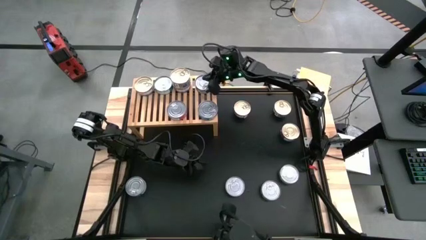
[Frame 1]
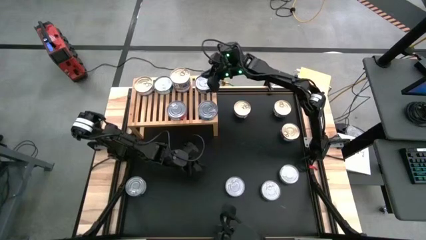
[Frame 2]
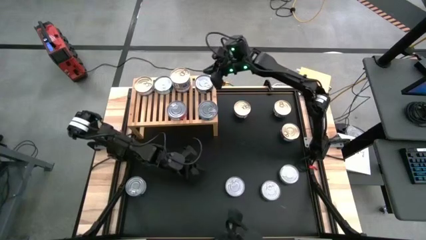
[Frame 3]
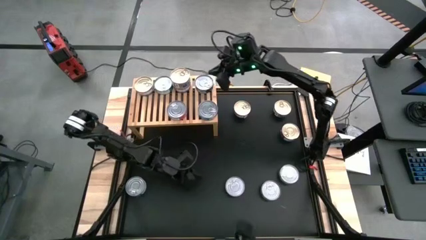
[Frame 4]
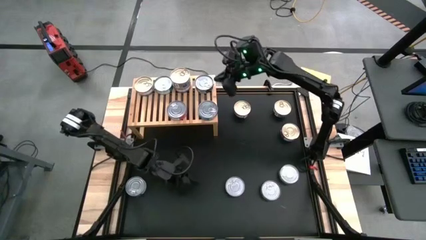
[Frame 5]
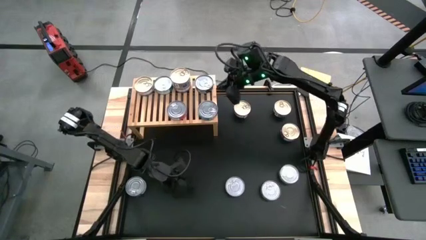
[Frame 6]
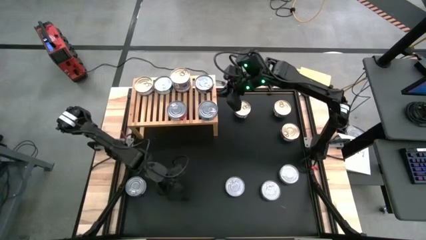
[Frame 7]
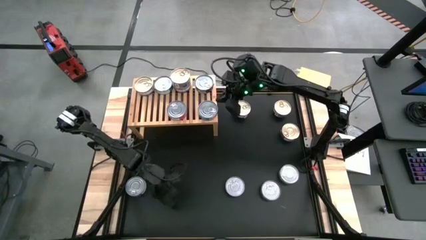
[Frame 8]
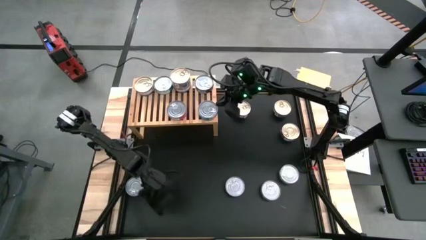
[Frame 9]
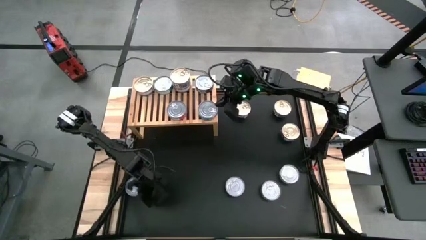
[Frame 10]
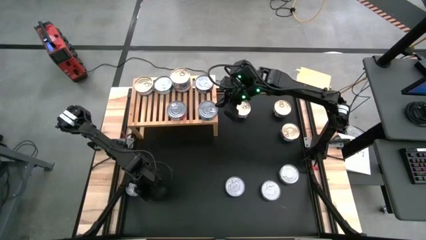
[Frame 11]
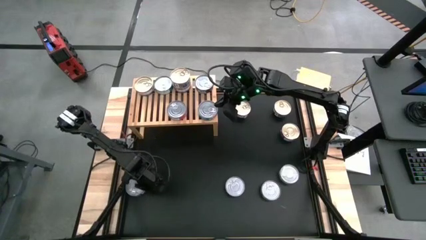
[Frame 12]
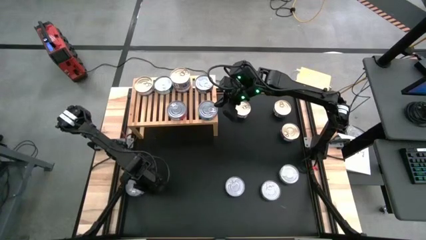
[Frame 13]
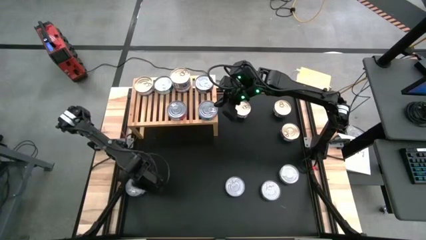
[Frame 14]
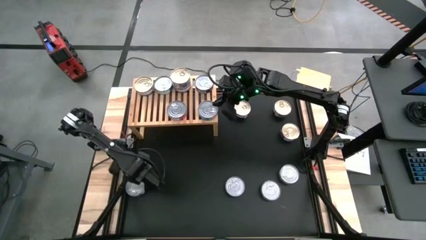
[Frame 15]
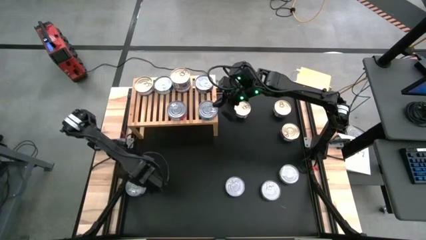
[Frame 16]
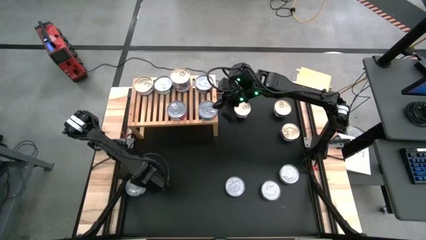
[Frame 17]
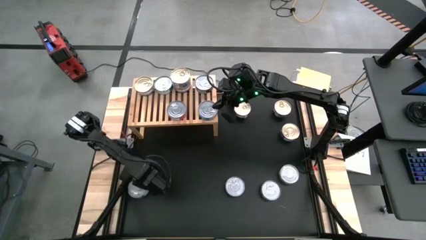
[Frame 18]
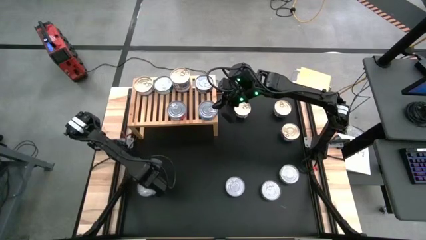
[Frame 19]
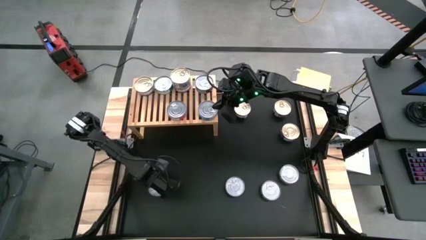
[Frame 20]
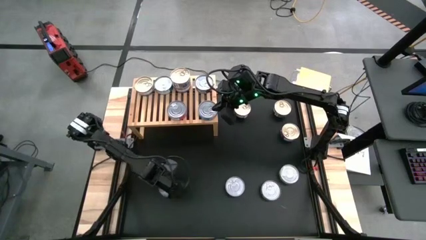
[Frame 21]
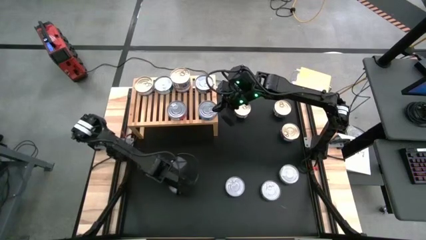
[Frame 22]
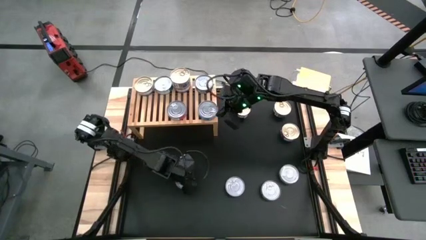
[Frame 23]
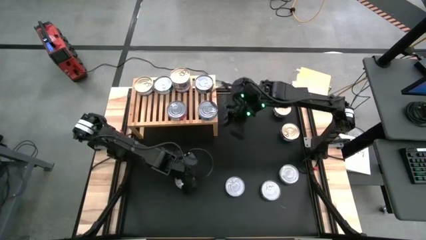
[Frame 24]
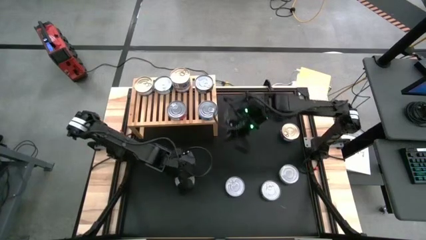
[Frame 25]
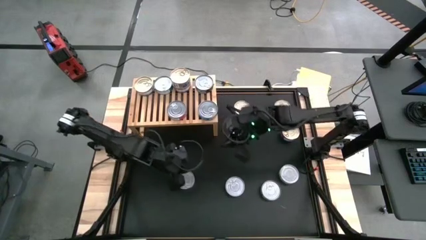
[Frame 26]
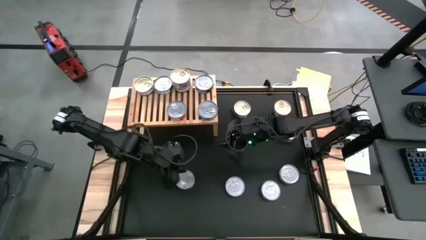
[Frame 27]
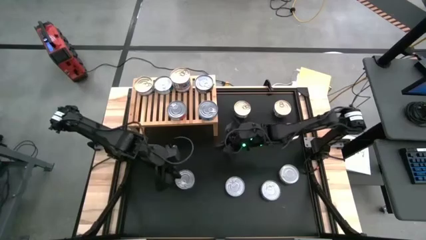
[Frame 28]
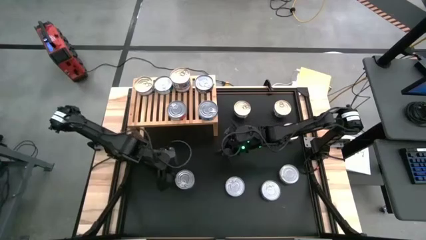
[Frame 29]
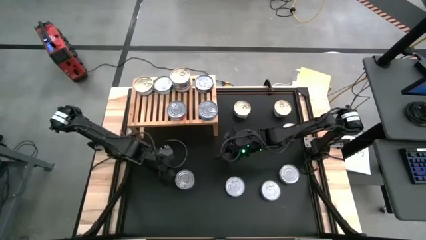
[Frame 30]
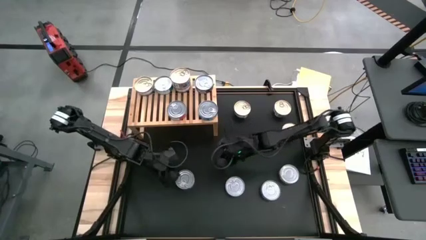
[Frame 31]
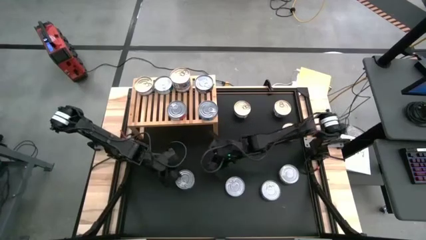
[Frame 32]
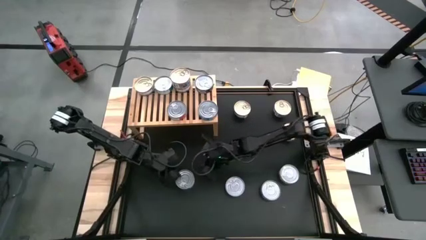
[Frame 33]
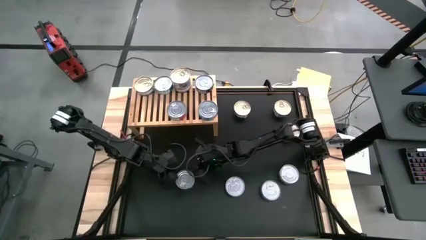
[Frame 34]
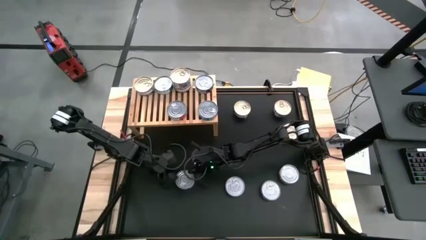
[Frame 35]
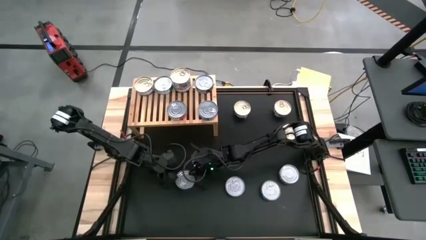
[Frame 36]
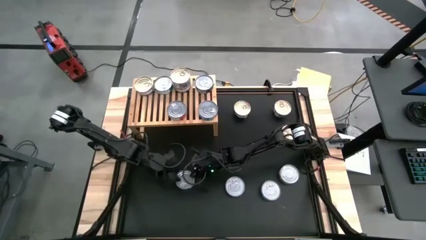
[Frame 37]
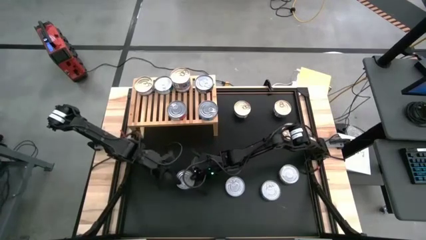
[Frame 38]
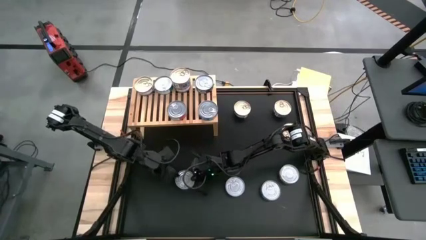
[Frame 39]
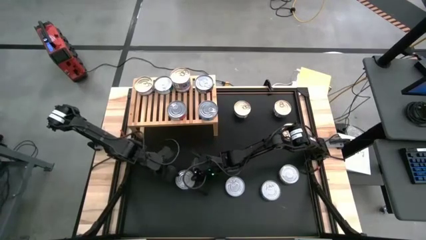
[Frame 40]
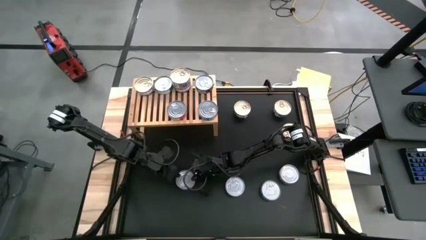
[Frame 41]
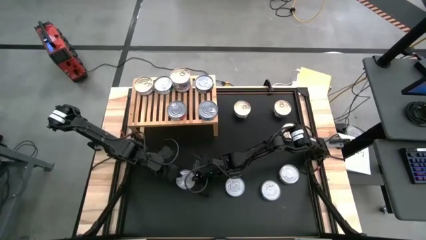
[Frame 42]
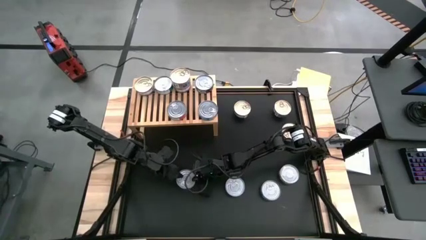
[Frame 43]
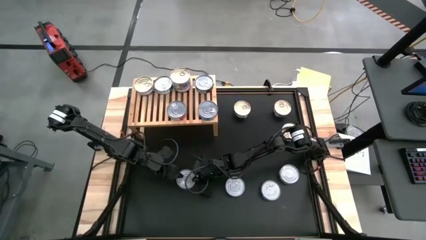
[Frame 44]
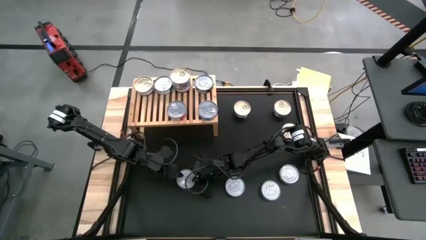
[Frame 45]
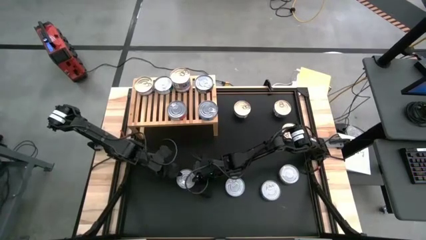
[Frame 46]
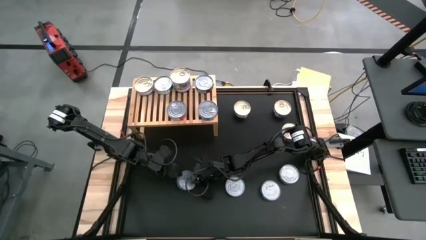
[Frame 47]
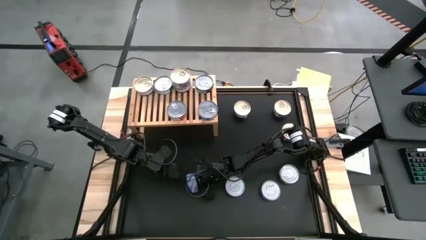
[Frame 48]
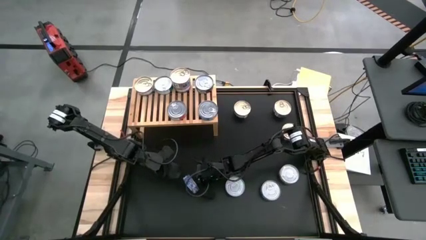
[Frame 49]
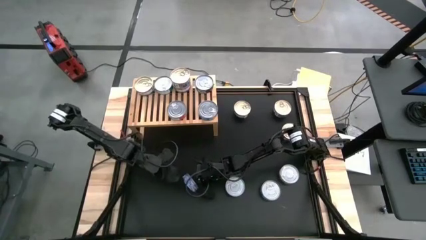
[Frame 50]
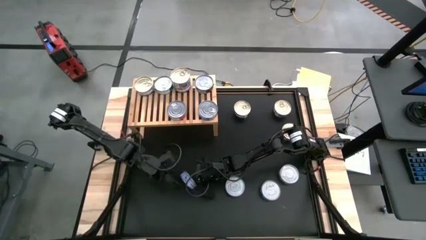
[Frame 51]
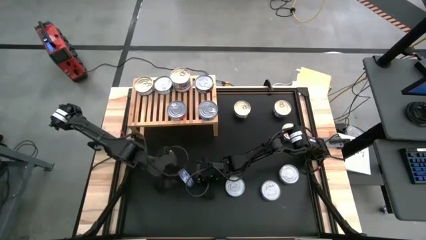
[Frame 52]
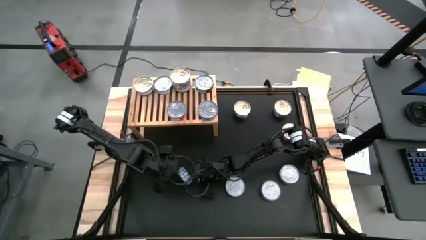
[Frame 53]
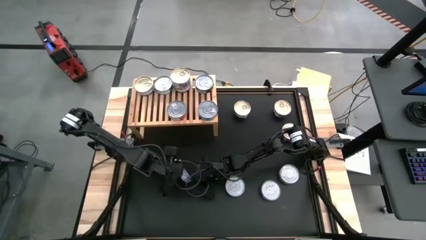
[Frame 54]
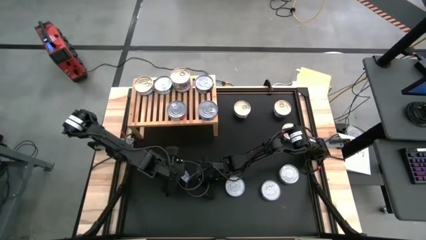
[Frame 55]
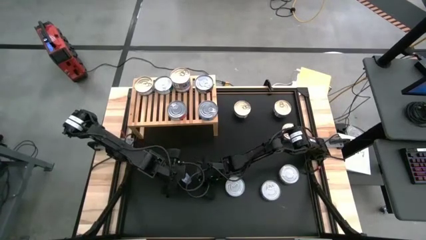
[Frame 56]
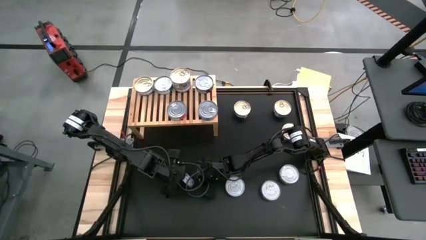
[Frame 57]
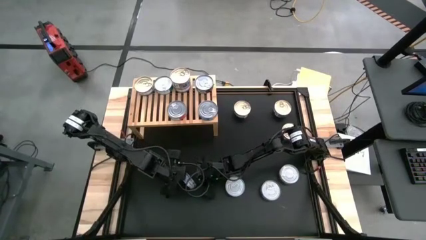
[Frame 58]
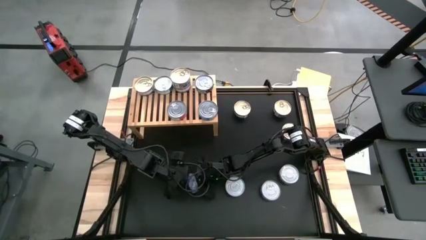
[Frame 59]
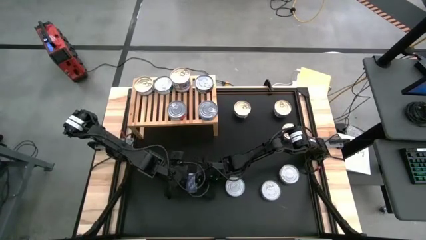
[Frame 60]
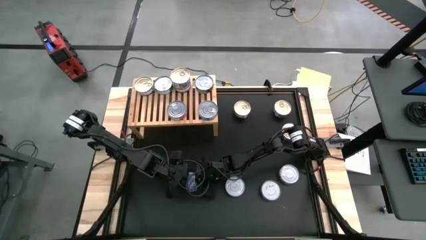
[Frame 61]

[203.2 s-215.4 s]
Task: Stack canned seafood by type on shelf
Stack the blue tuna can on top of the other blue tuna can on the shelf

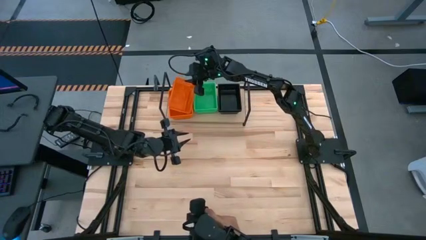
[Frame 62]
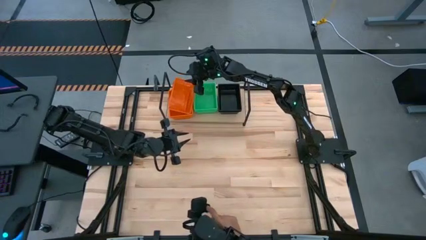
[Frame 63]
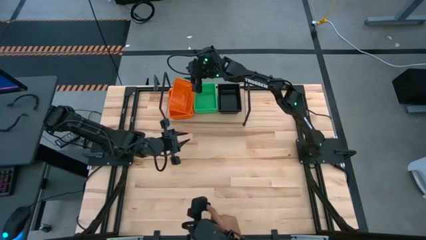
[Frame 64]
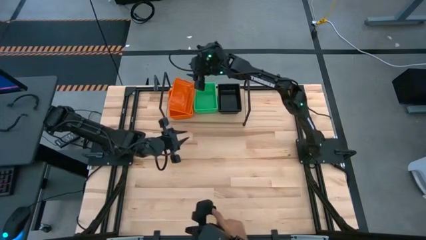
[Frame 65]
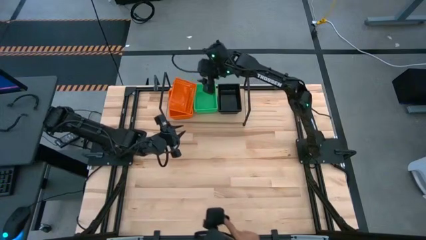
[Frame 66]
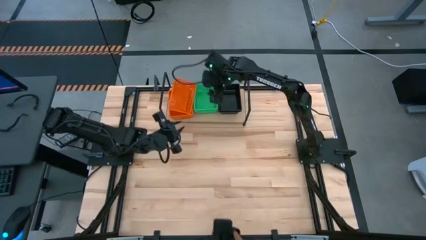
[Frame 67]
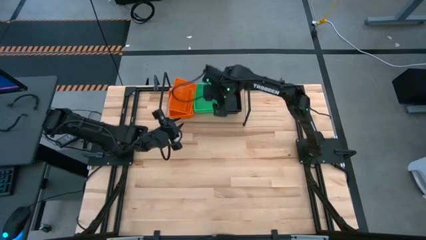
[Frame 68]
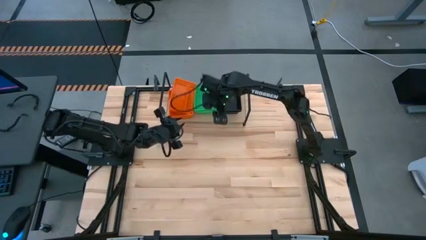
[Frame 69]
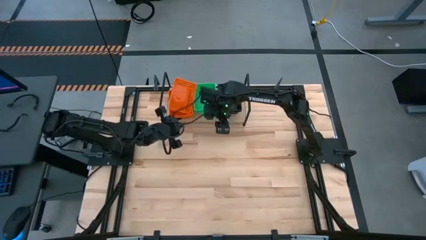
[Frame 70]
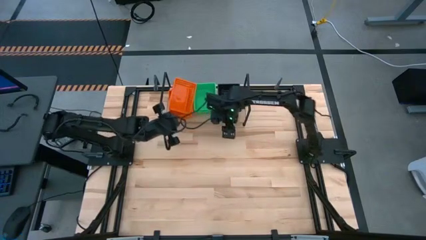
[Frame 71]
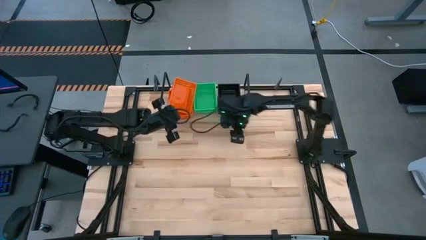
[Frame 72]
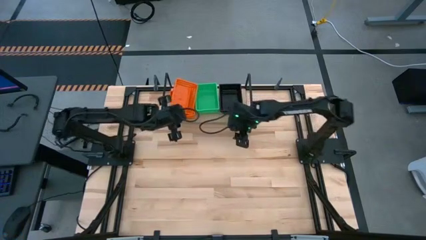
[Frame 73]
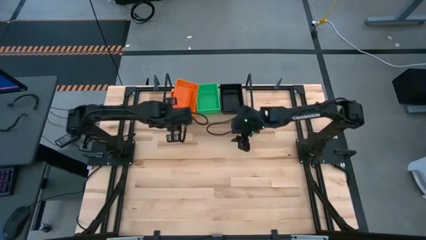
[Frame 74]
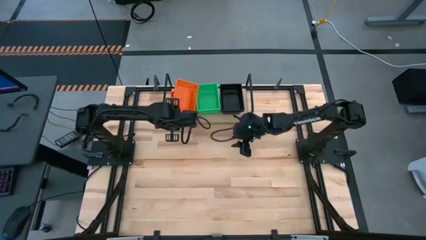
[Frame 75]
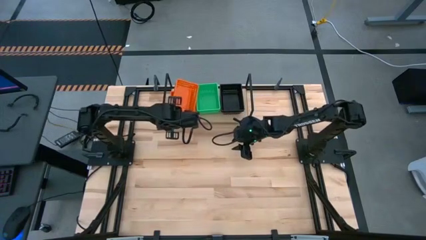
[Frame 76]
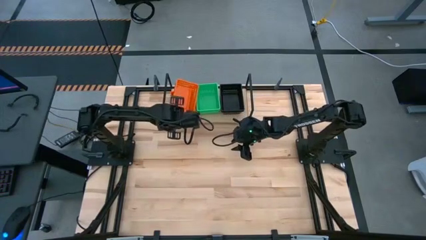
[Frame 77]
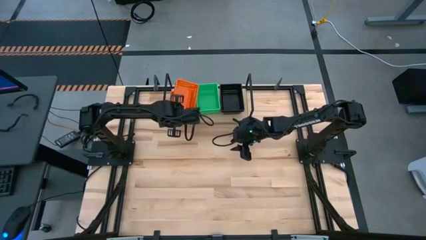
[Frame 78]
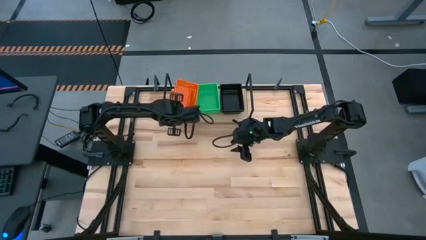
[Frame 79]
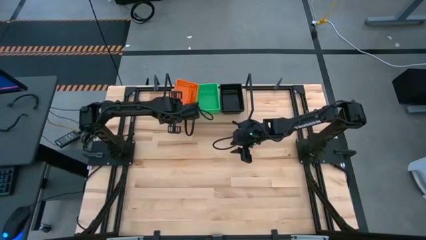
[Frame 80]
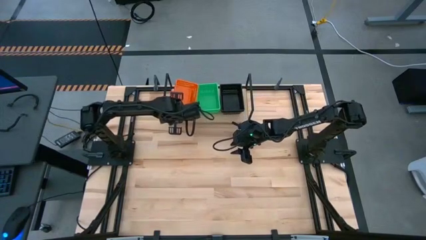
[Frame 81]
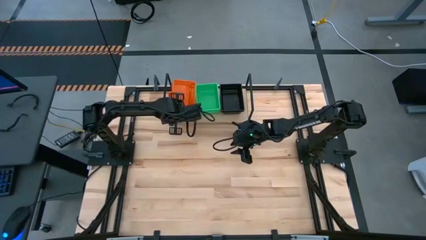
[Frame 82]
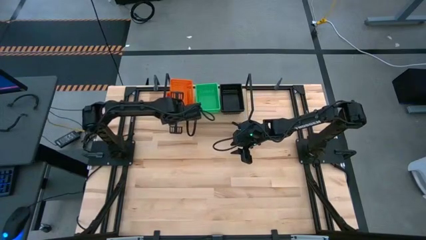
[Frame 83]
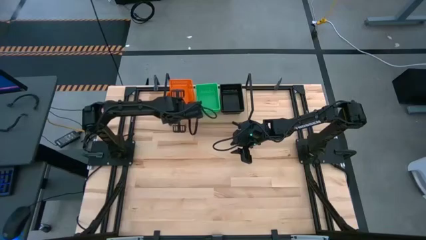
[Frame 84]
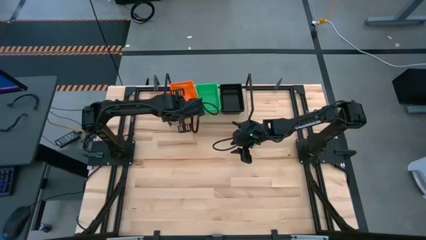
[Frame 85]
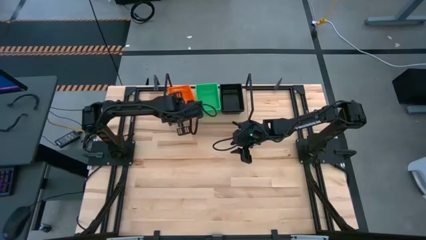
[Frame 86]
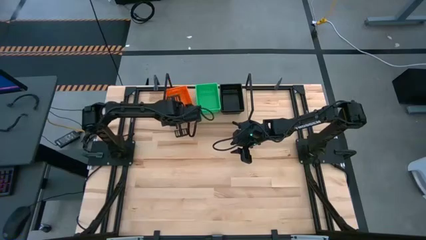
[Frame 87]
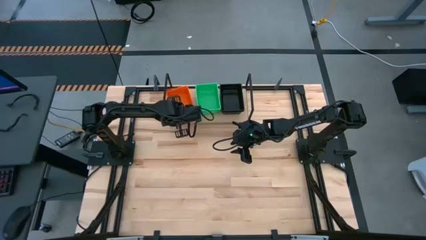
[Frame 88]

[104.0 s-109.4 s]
Task: Stack baskets on shelf by color
Stack the orange bin on top of the stacked orange bin on the shelf
